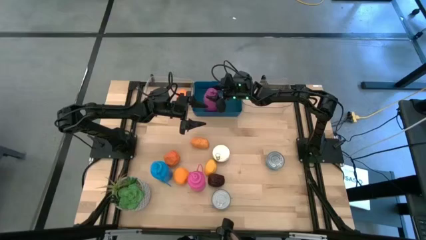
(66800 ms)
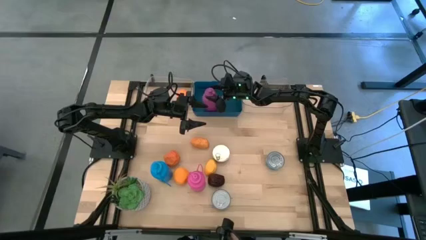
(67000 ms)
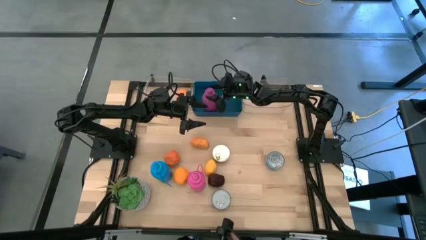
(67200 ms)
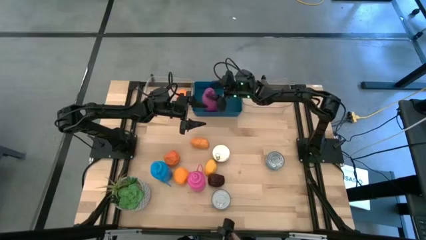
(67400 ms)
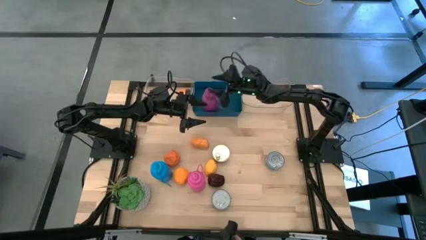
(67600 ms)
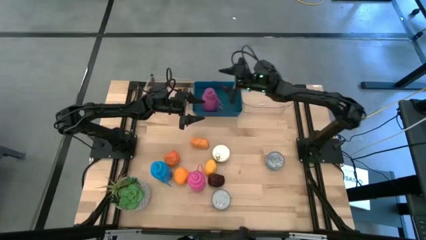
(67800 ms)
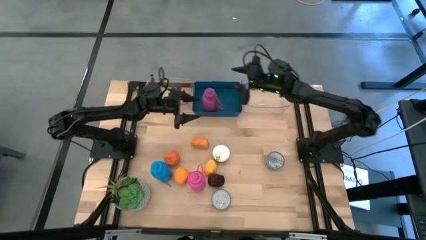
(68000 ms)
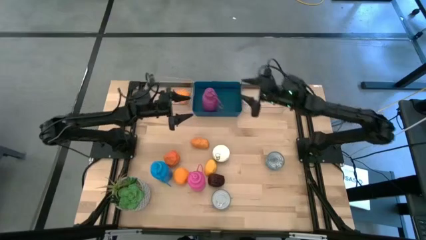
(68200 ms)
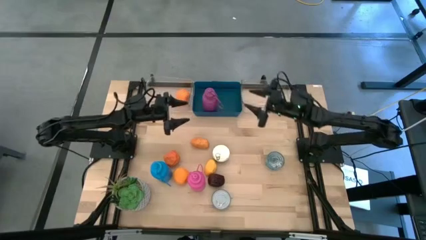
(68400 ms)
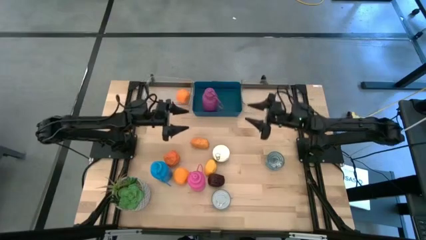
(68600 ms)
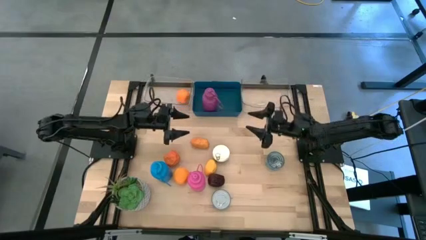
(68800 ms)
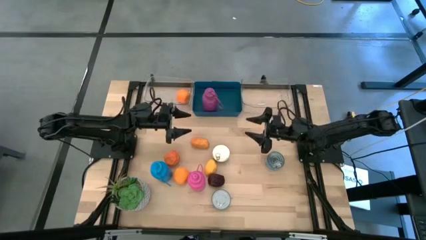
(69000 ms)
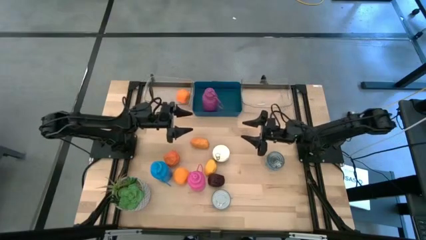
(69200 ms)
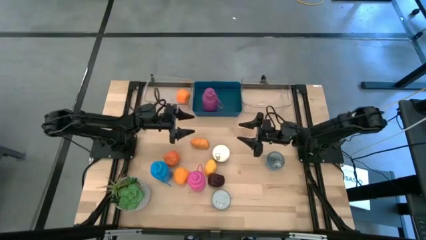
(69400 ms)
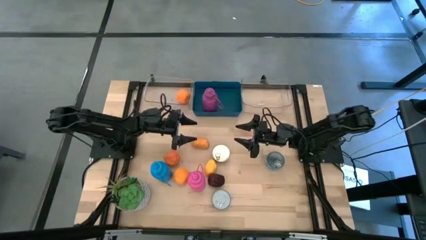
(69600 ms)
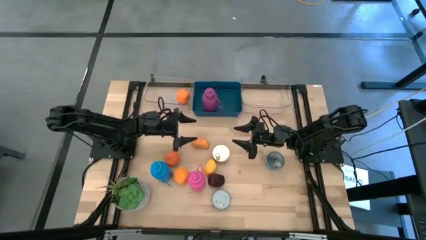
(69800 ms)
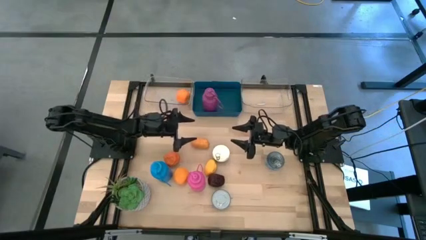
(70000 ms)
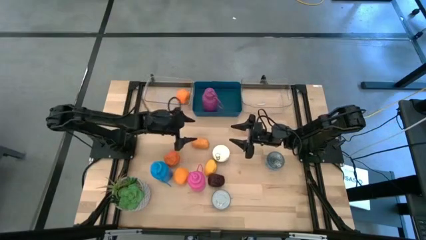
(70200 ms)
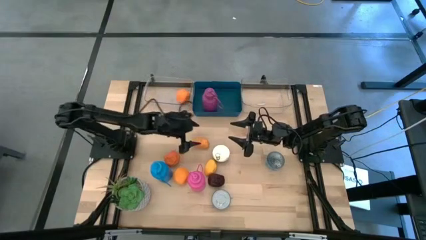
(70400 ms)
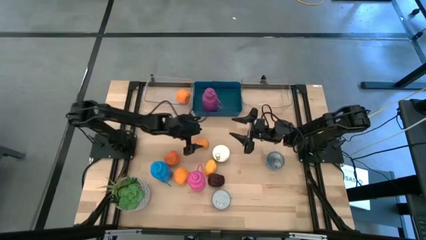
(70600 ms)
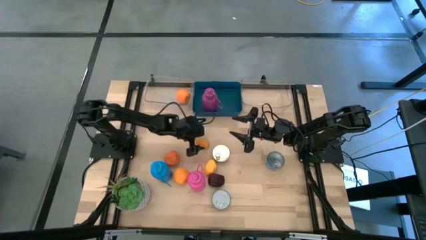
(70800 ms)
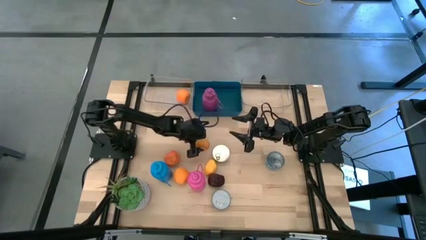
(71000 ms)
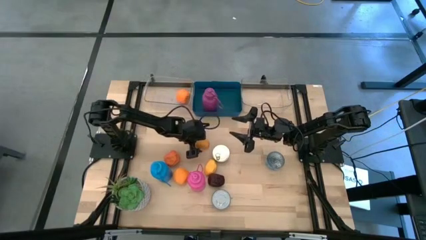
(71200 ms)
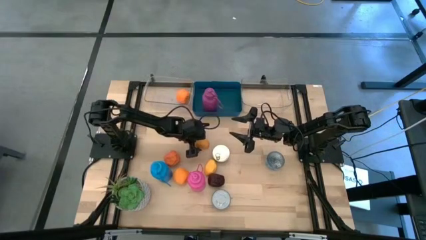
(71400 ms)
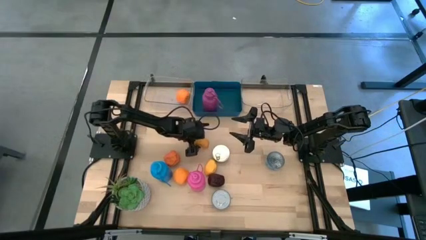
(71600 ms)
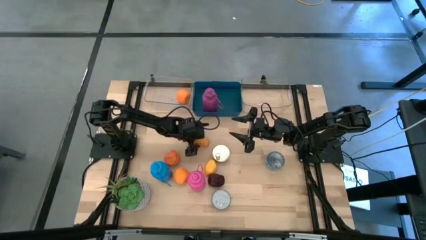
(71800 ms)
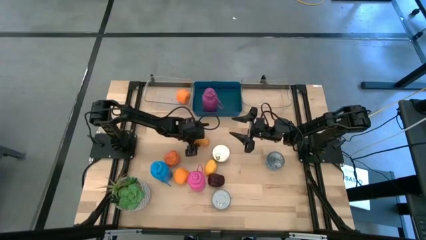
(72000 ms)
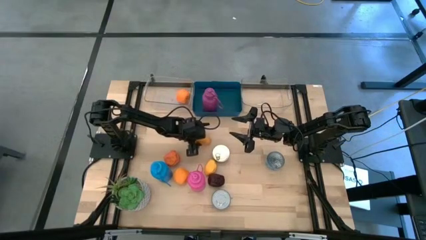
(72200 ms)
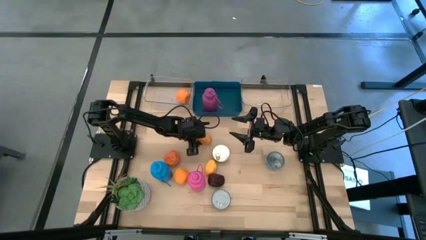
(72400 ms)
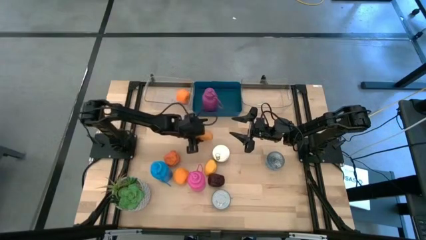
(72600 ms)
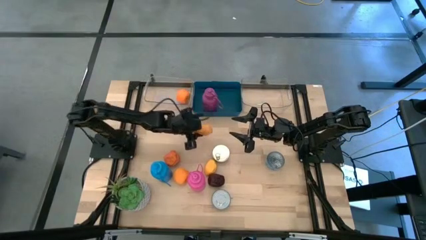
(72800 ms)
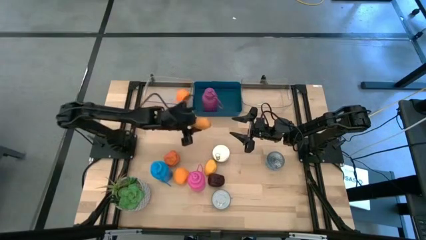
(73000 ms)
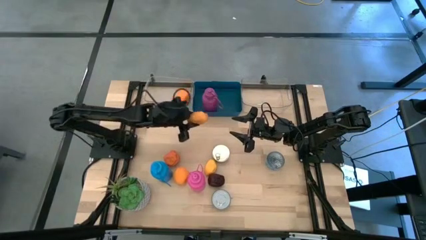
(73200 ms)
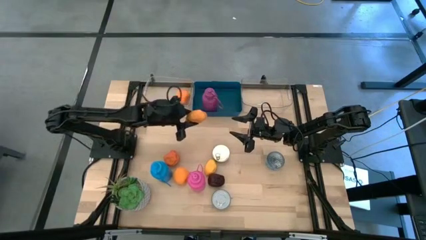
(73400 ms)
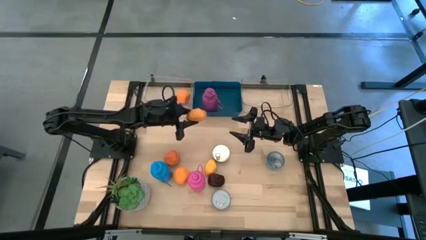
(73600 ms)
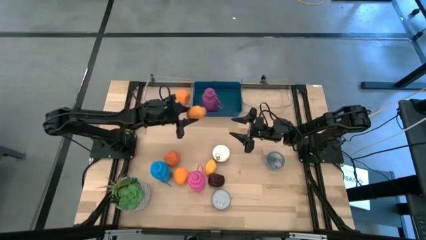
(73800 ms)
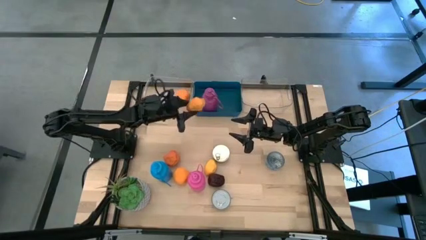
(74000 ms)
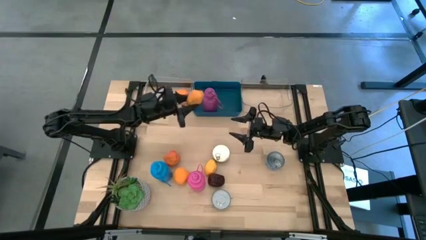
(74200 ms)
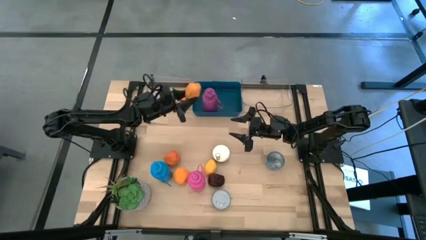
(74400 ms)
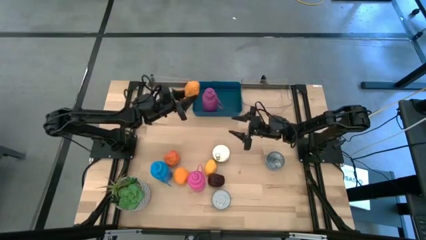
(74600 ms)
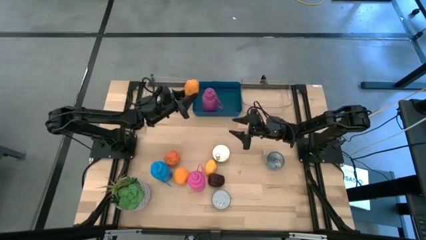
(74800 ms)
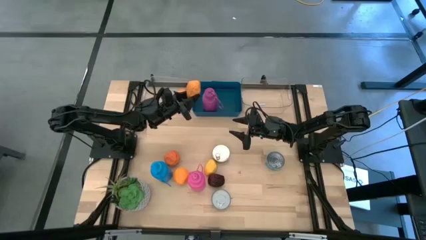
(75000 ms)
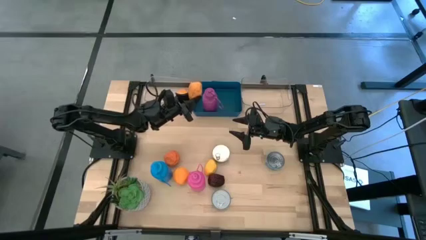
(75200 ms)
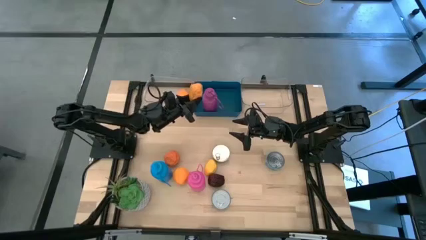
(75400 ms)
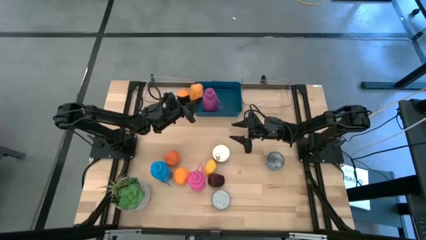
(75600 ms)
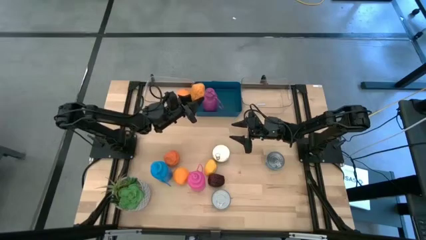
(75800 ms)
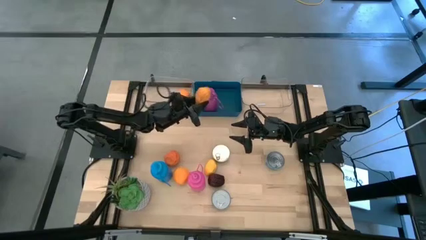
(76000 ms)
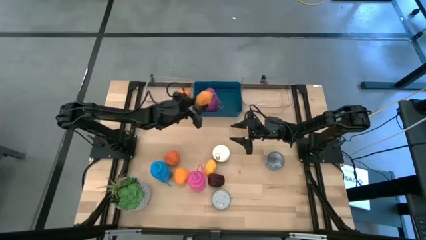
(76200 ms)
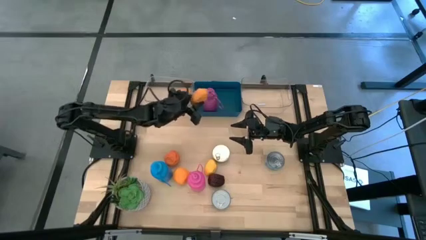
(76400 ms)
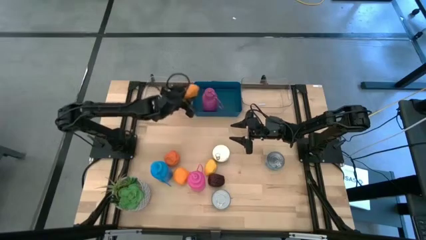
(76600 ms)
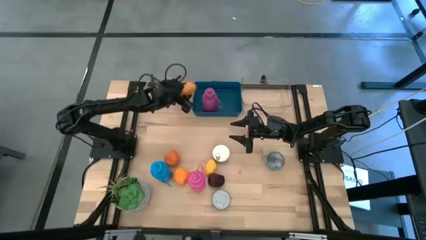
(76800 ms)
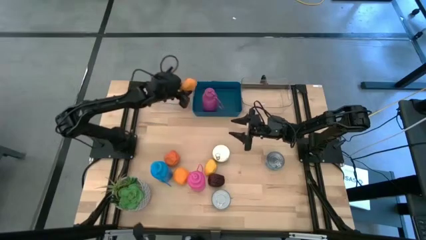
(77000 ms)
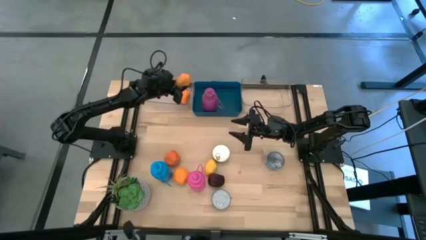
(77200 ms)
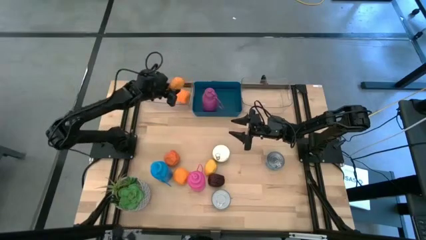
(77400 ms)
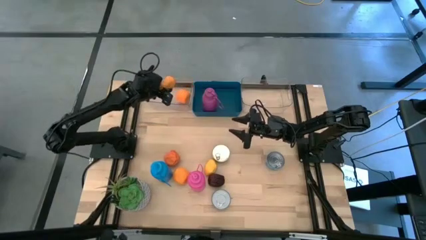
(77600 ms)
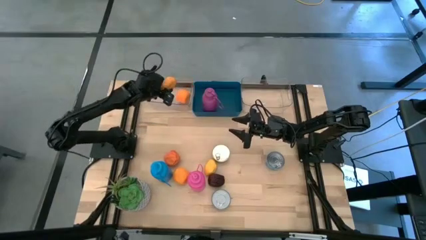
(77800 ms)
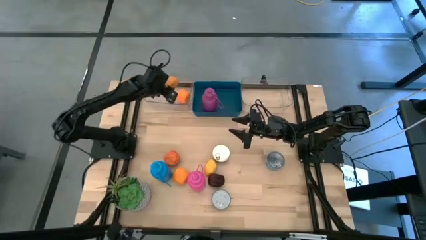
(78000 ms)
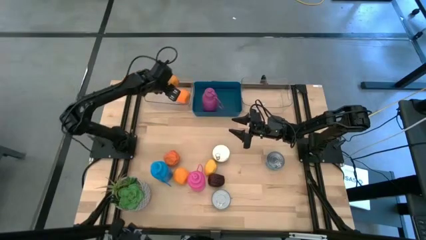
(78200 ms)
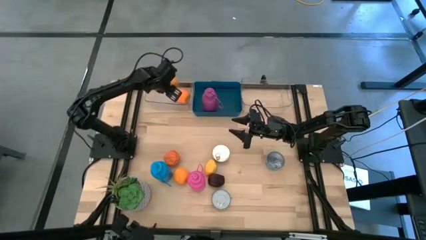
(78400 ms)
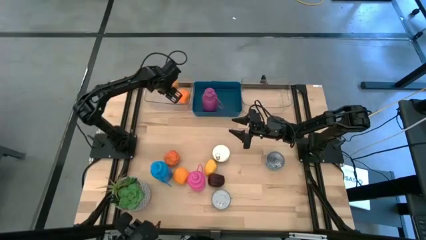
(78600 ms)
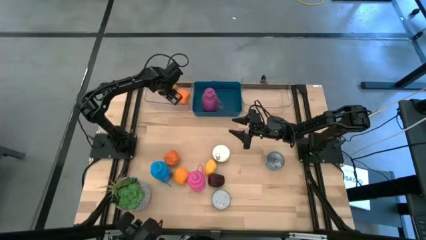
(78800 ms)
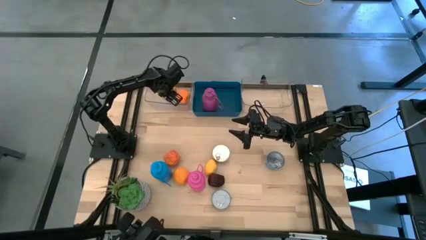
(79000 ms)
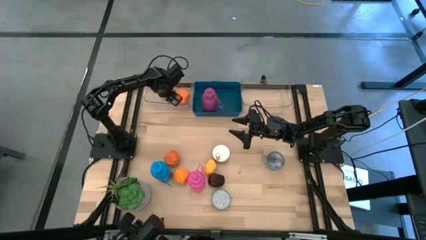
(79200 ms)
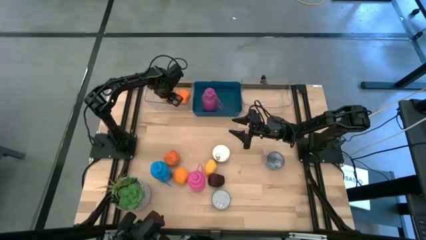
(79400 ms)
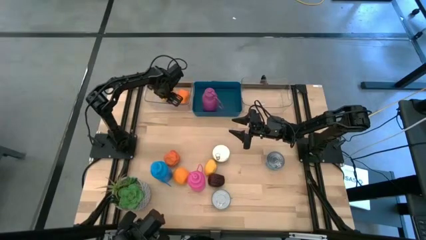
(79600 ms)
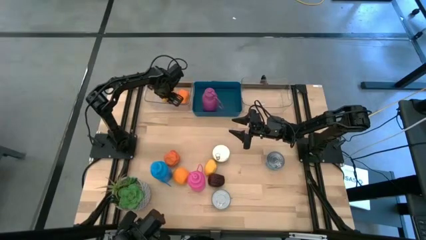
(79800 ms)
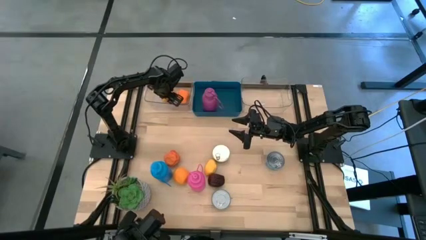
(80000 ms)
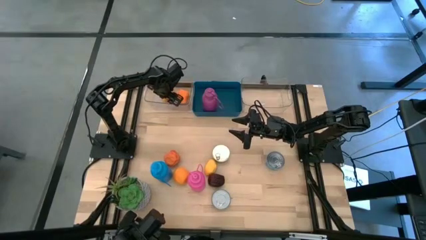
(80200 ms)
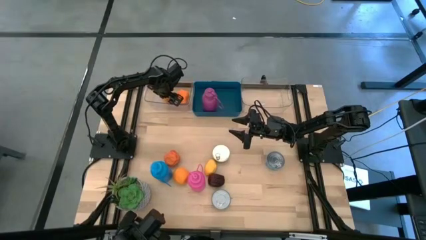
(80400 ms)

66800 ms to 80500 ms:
Task: Pick & Place Food Item
Put the mango into the left transparent bin

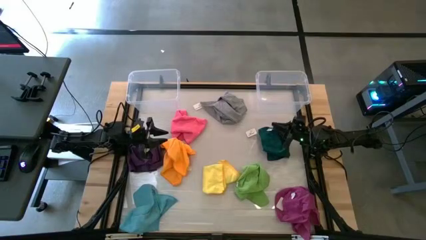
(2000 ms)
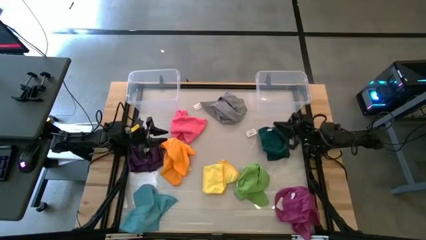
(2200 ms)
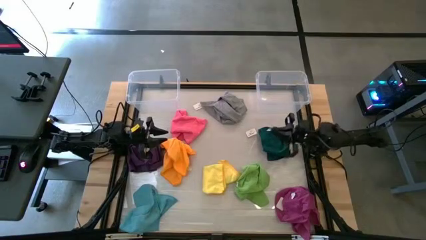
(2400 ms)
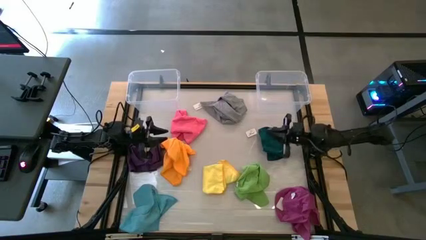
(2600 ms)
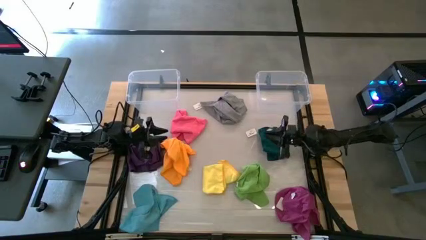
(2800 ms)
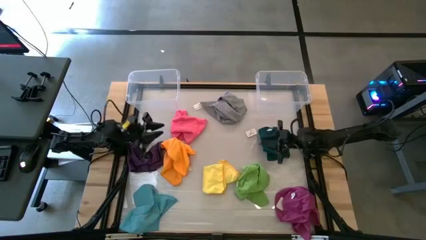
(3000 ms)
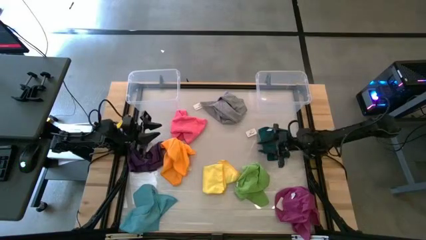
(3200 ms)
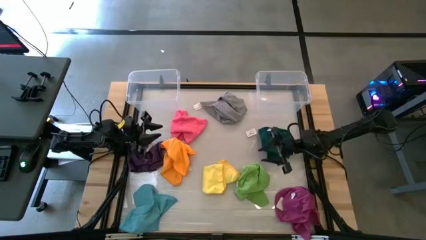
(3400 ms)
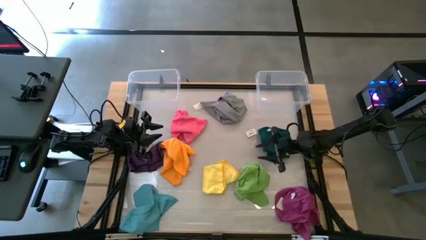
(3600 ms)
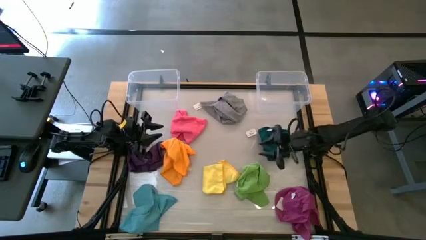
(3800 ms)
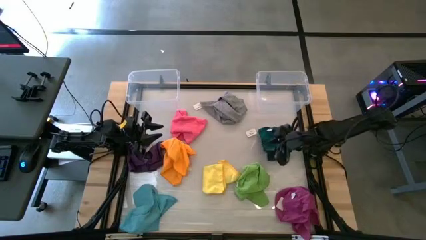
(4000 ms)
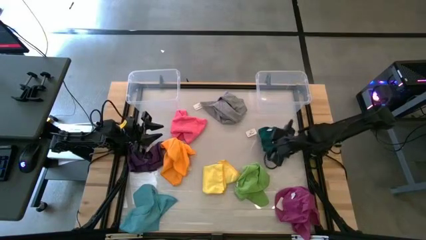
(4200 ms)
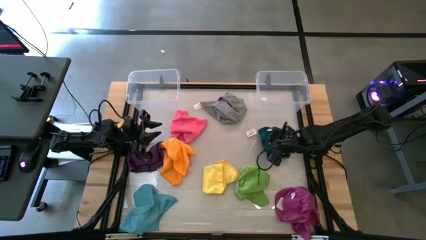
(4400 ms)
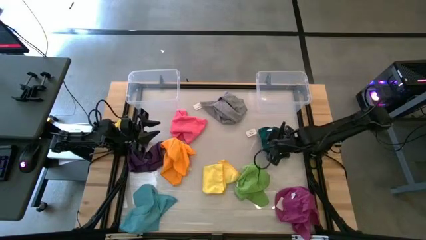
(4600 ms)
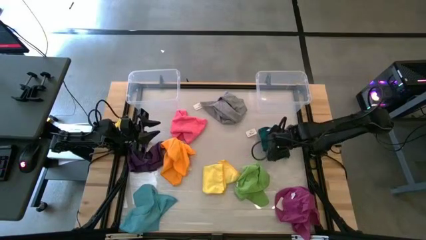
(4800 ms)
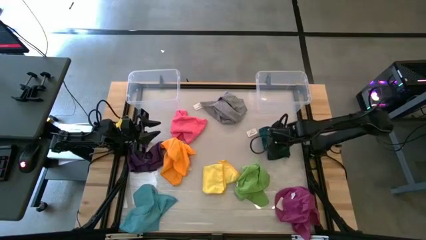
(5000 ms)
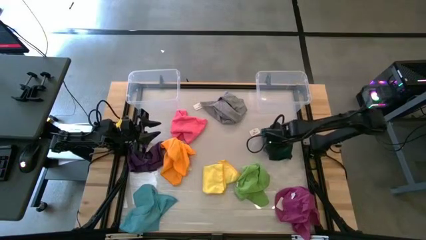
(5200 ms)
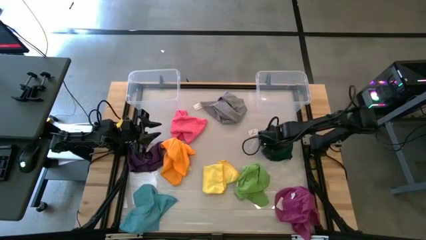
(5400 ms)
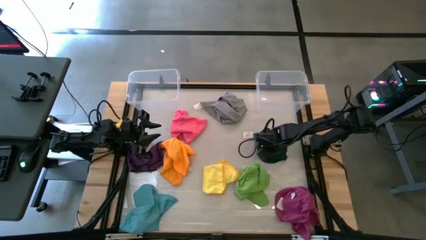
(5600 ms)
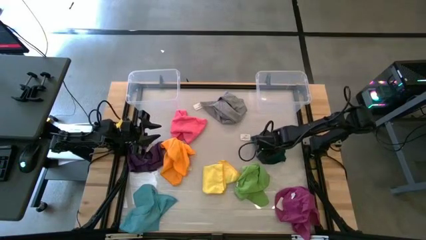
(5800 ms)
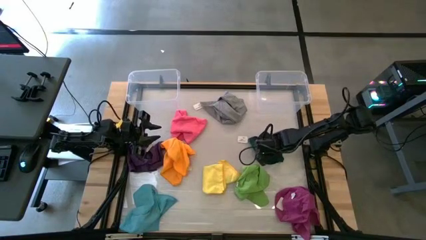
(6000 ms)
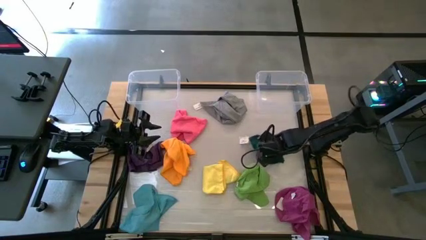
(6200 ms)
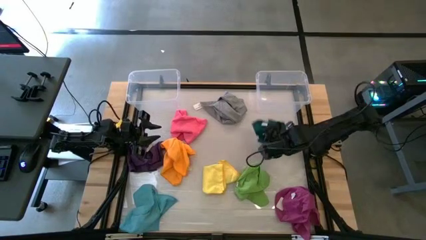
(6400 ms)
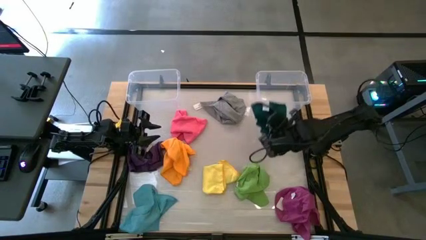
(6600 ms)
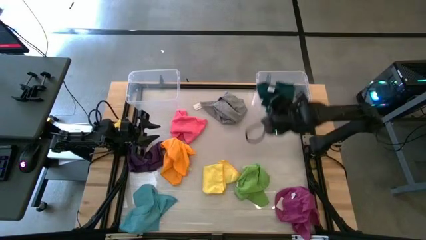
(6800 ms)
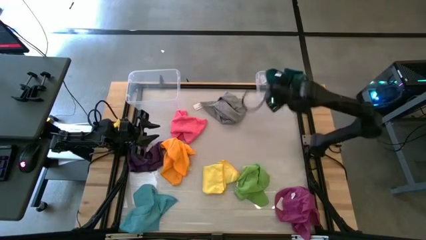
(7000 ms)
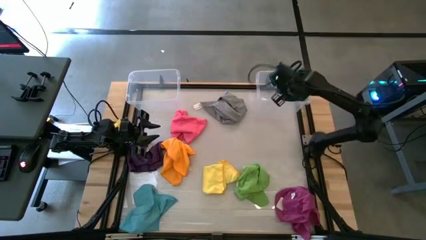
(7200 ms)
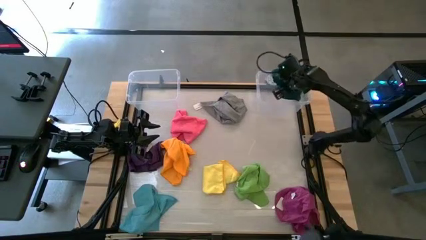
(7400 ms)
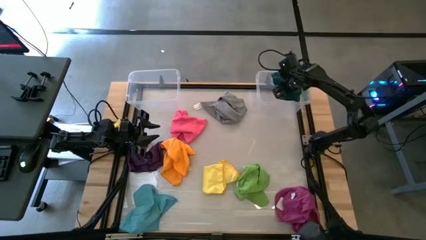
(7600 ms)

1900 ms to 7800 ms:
Task: Sort towels by color in basket
Put the dark green kitchen towel into the right transparent bin
